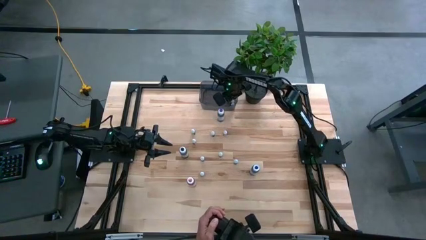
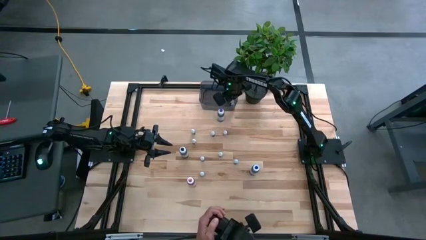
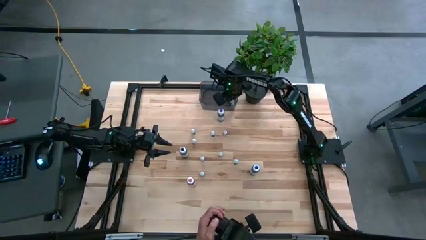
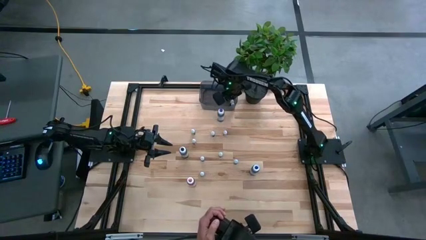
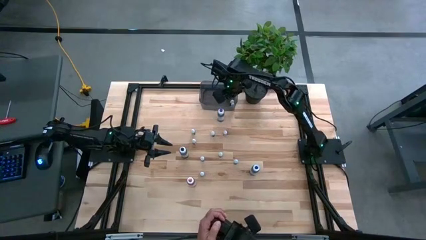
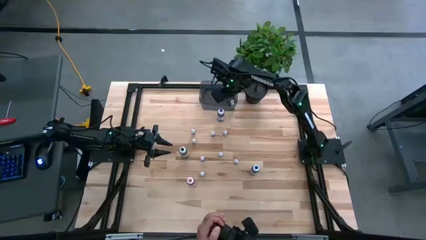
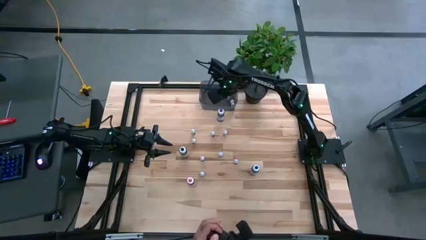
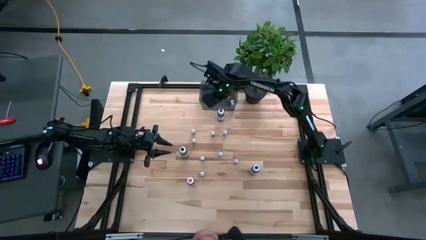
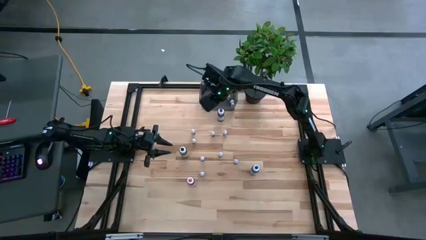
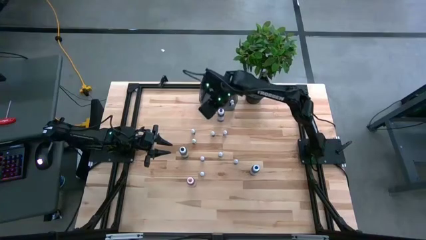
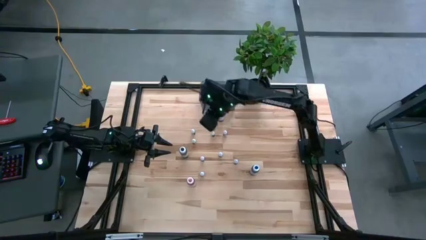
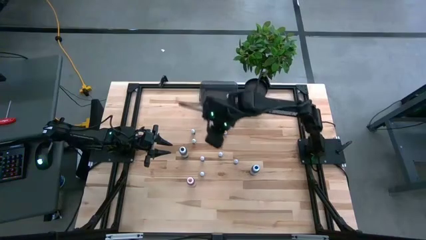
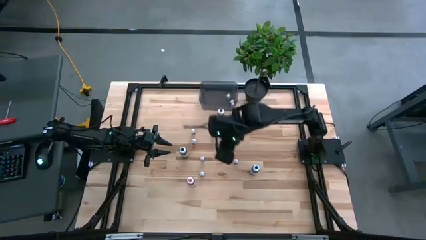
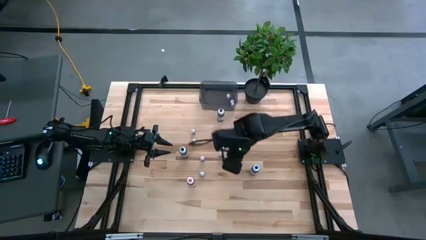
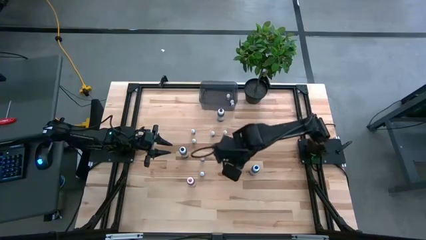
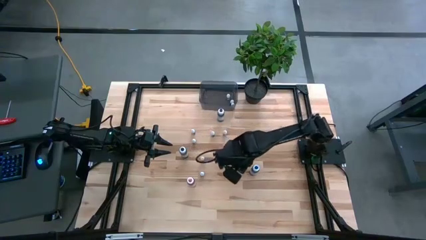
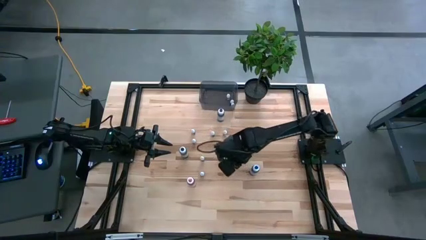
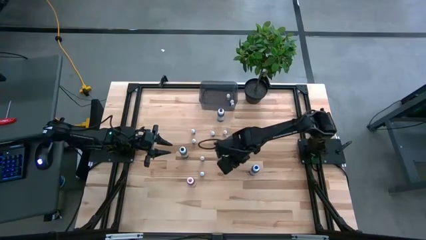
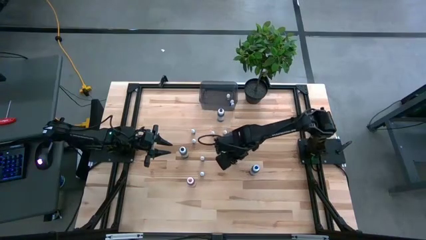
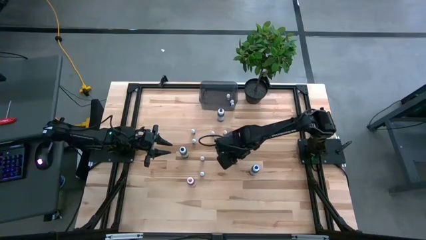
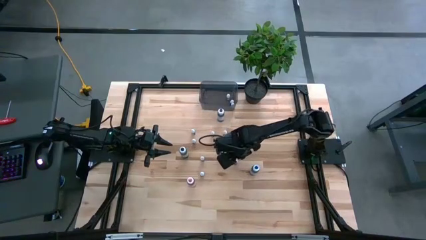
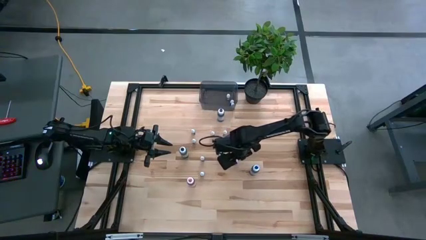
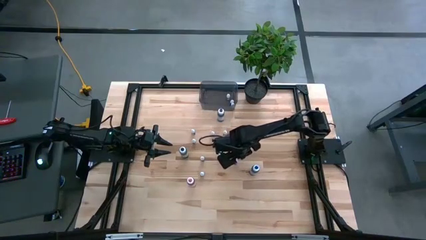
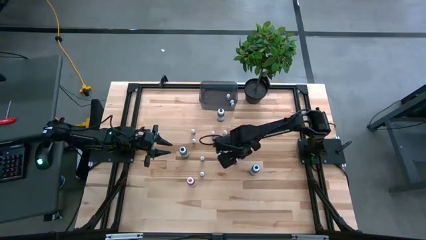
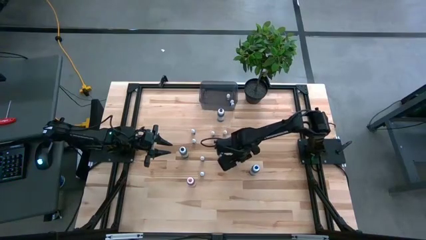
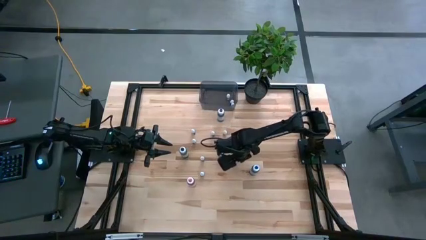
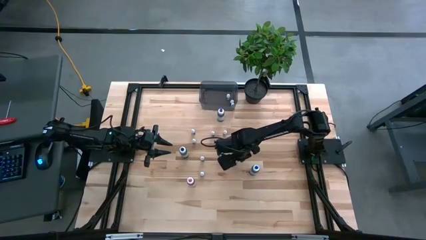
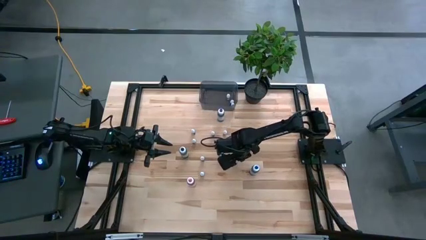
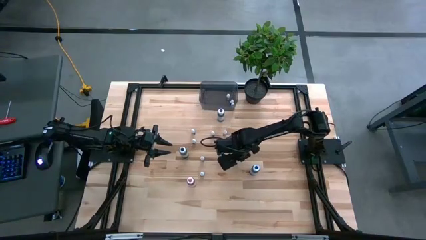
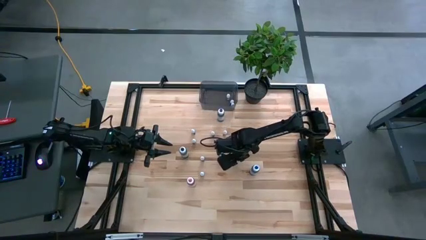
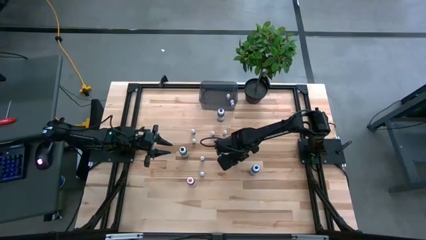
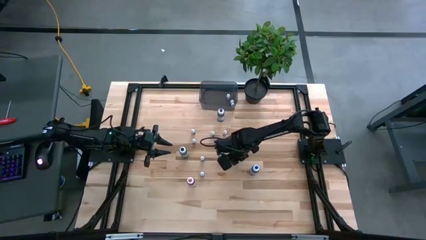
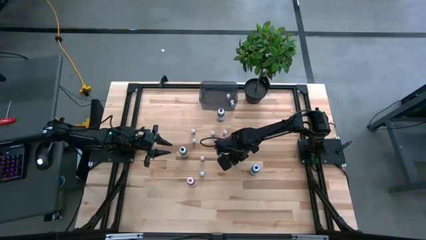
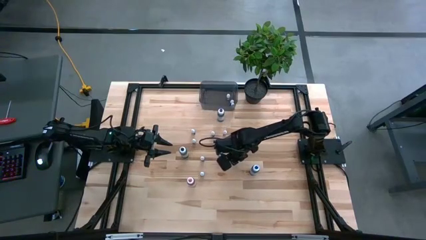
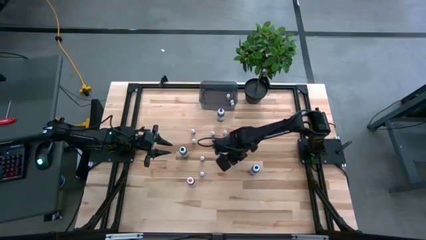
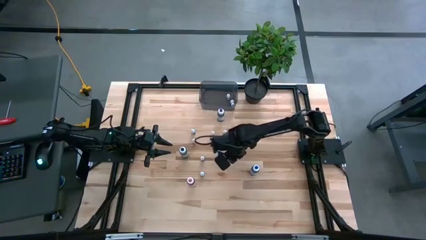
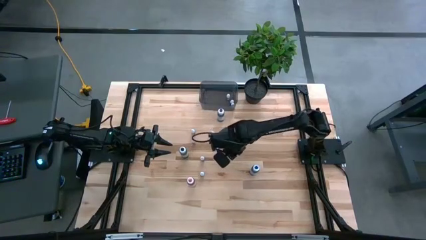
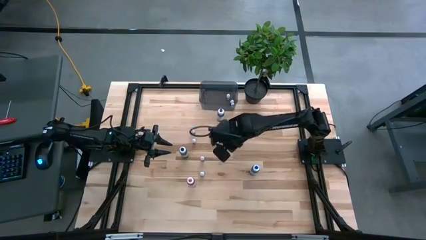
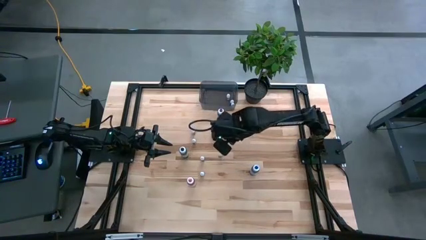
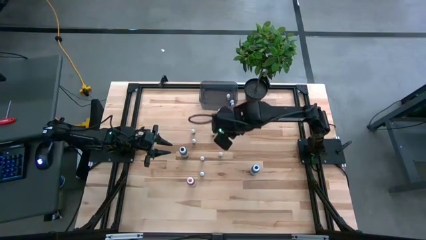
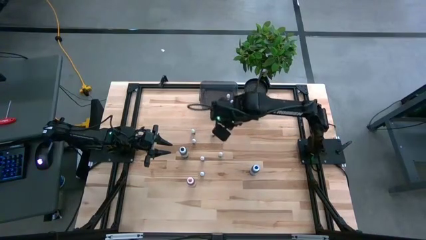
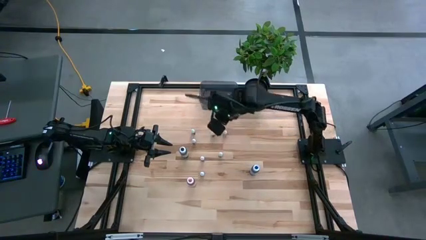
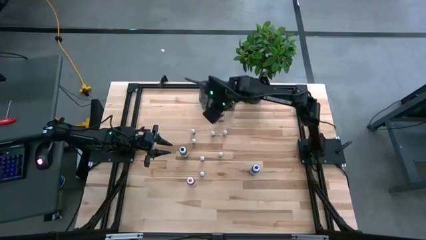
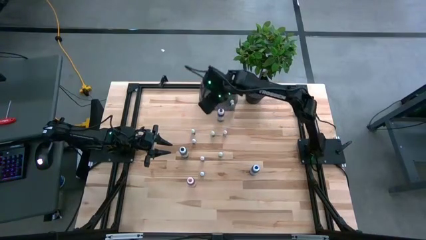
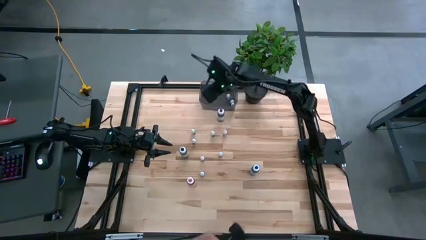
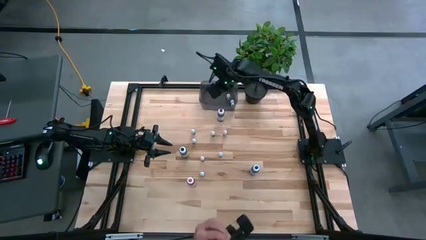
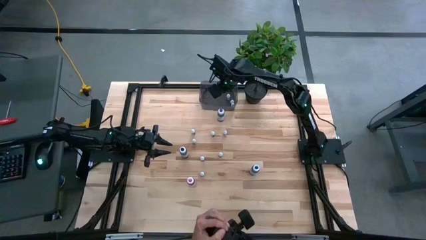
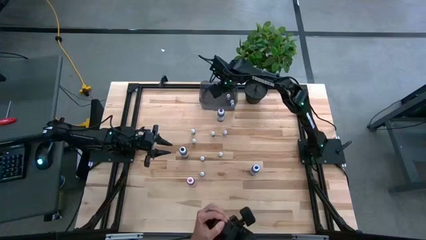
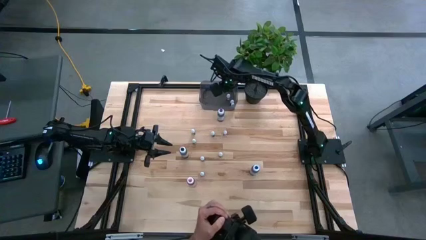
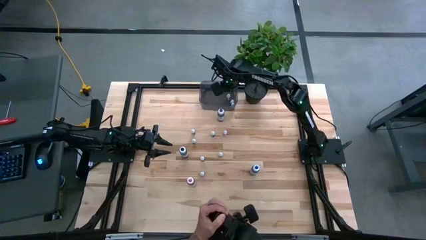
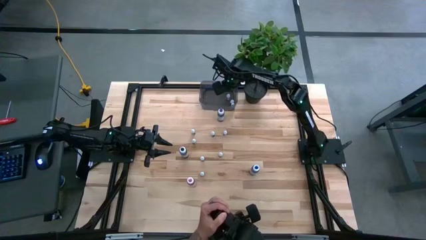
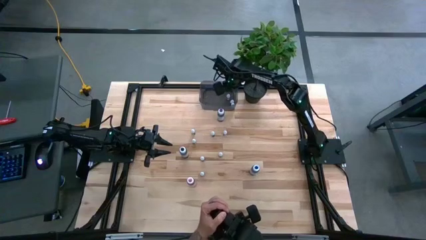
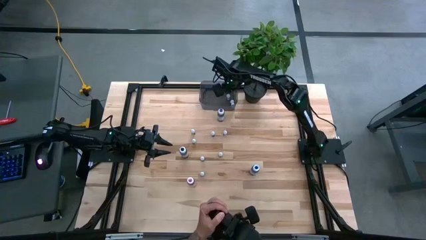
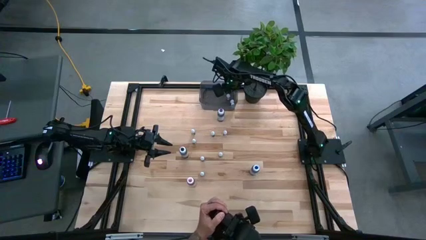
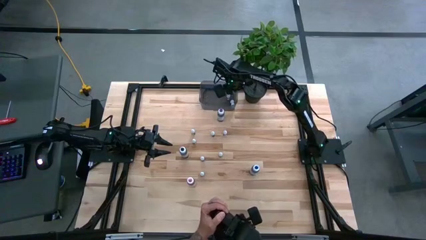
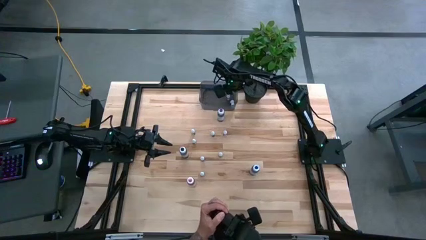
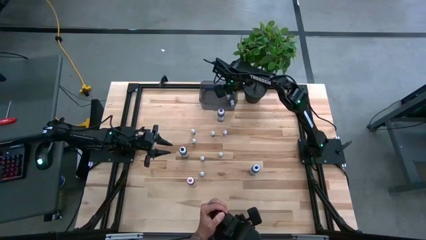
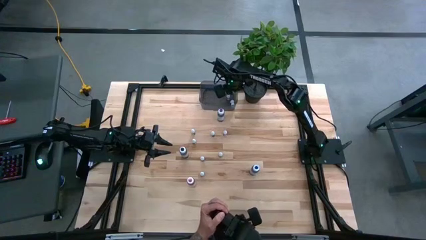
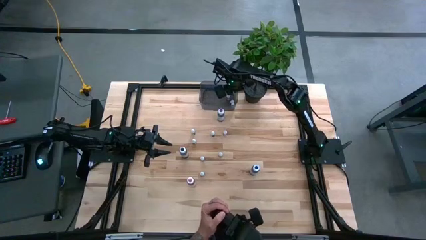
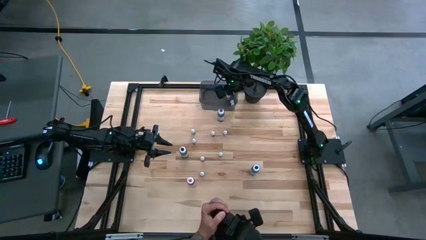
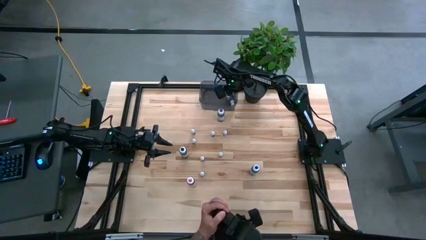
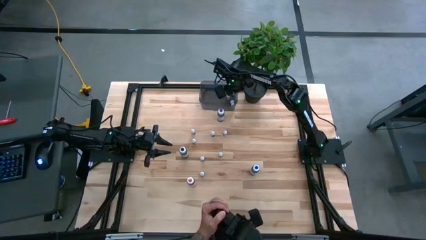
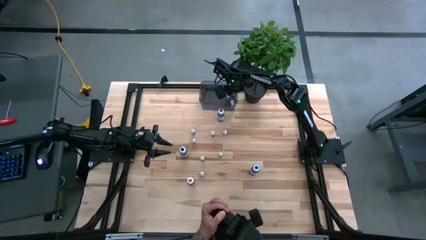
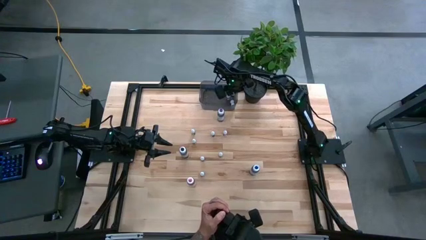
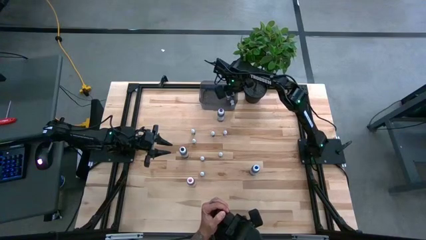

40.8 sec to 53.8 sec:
Task: Pick & Place food coloring
Put the small blue food coloring bottle into the black bin
